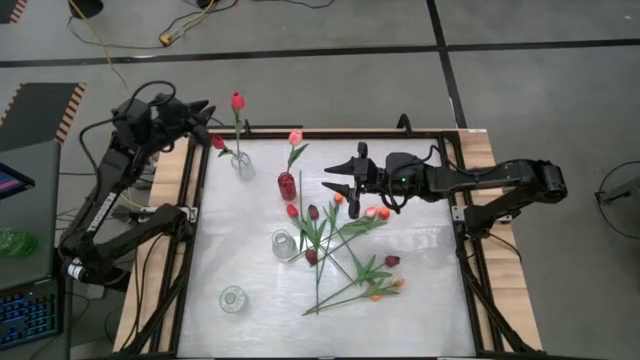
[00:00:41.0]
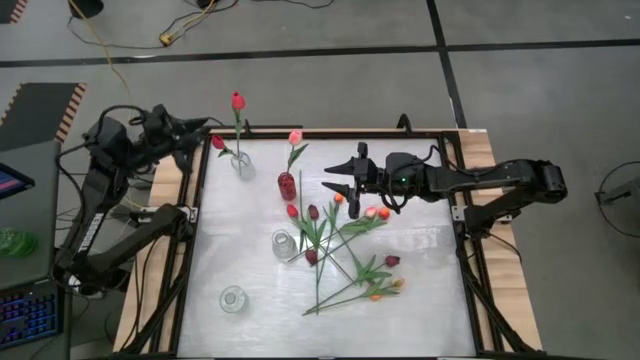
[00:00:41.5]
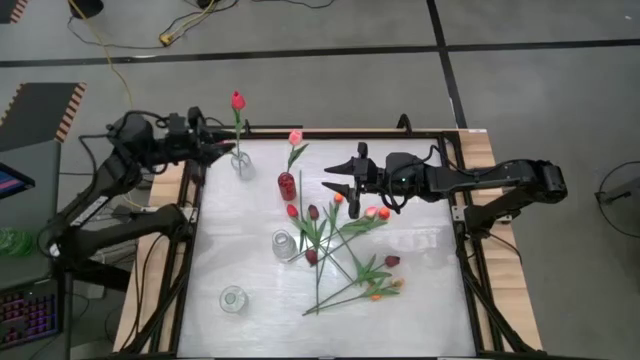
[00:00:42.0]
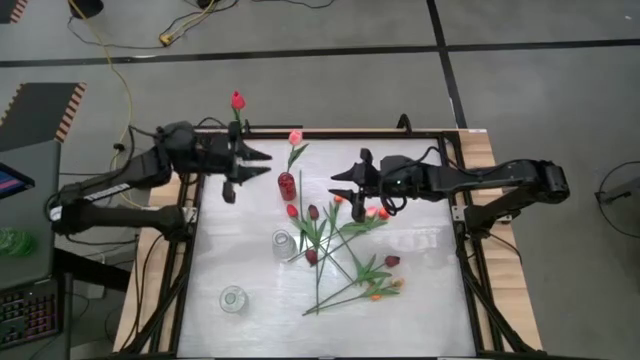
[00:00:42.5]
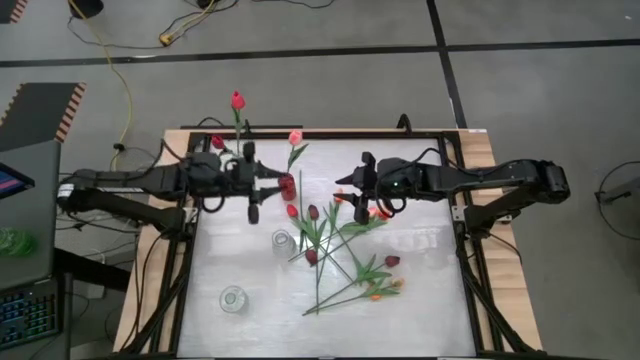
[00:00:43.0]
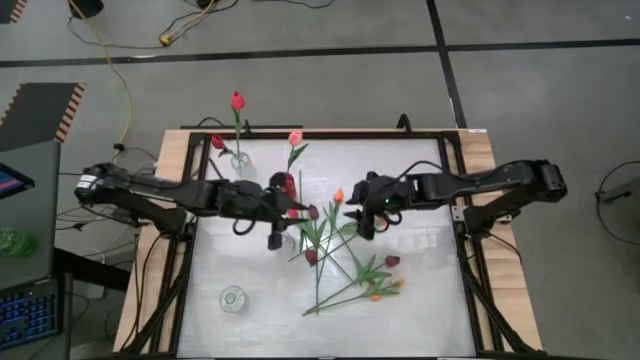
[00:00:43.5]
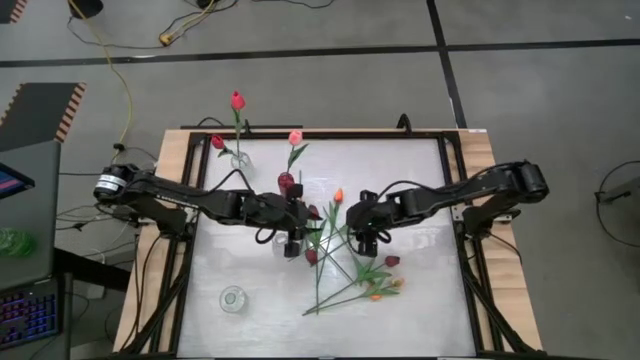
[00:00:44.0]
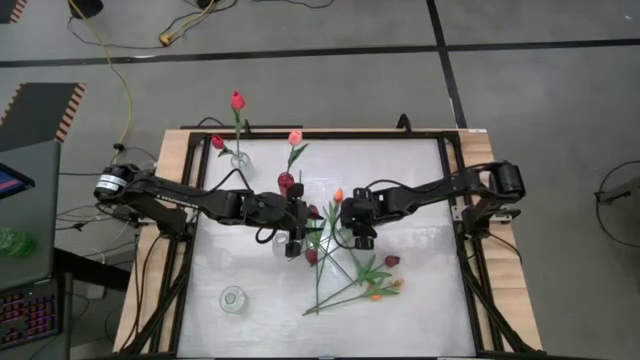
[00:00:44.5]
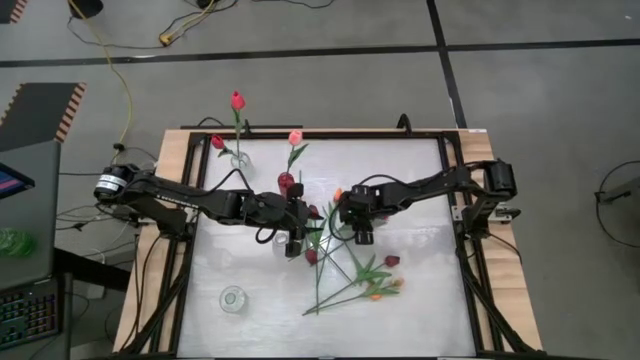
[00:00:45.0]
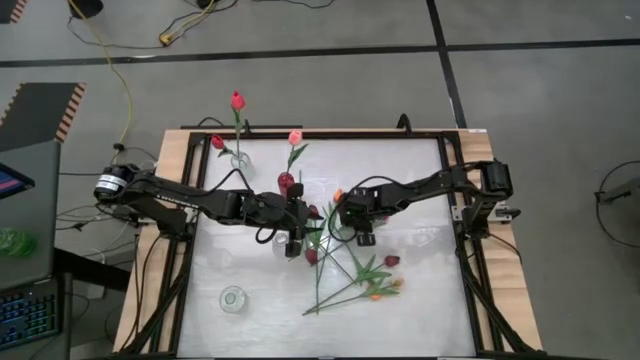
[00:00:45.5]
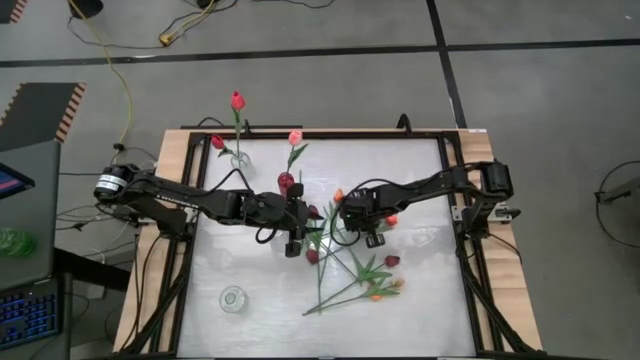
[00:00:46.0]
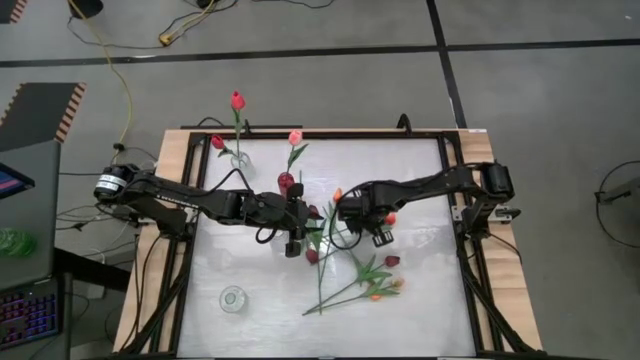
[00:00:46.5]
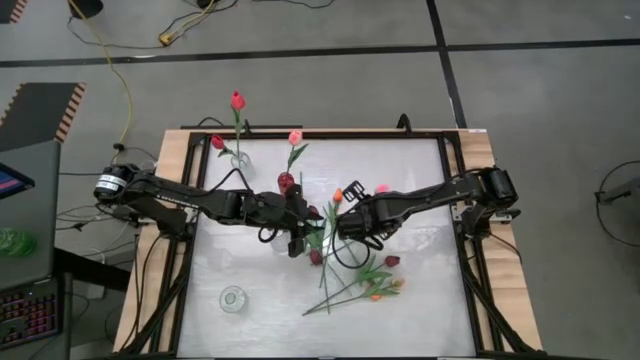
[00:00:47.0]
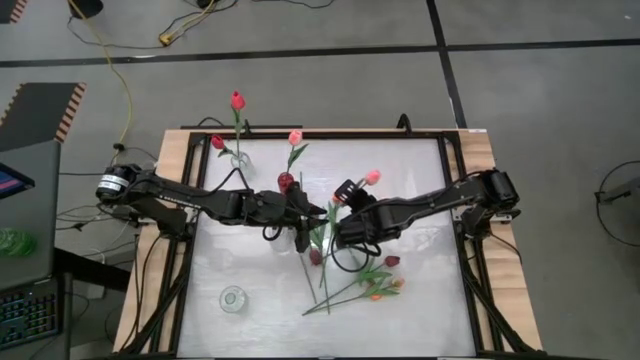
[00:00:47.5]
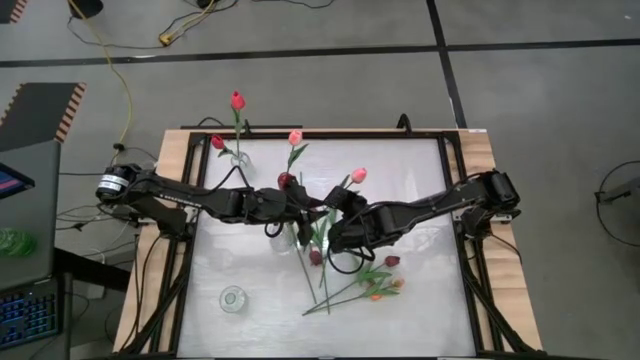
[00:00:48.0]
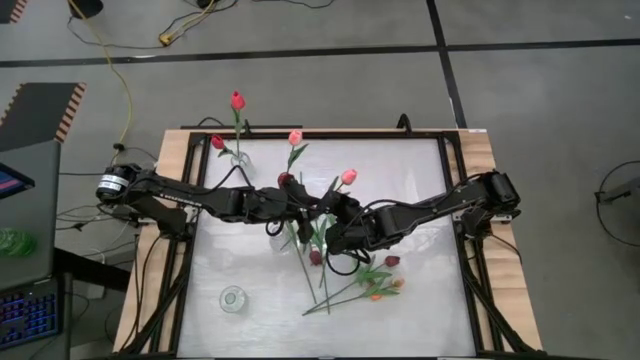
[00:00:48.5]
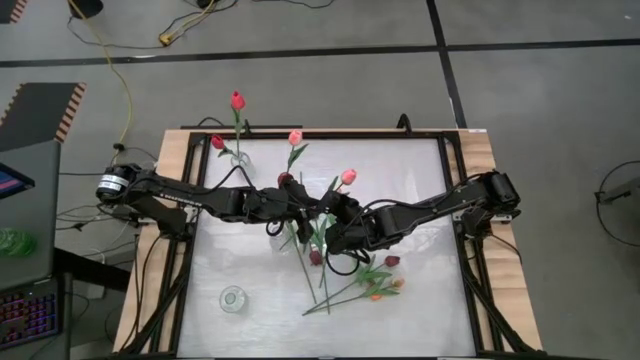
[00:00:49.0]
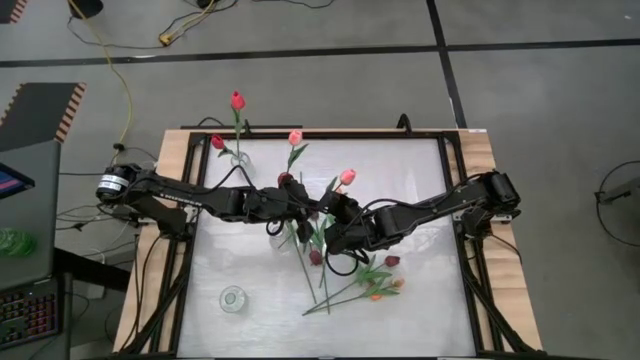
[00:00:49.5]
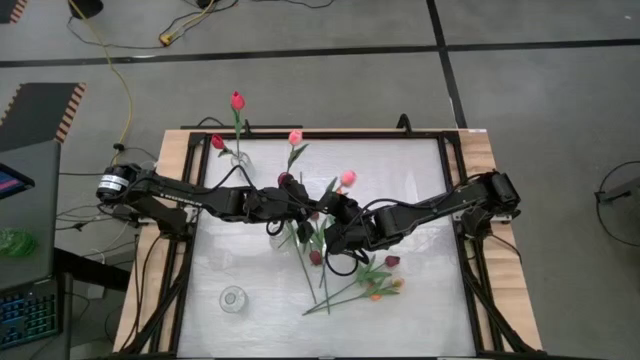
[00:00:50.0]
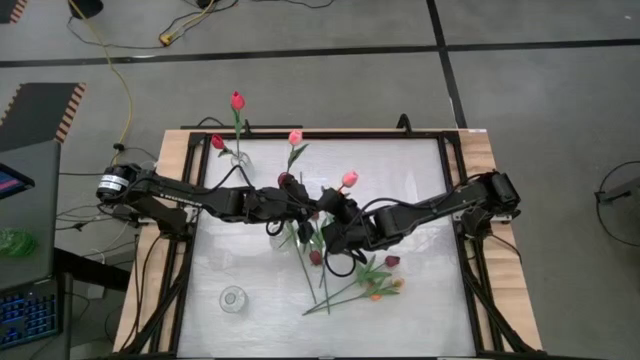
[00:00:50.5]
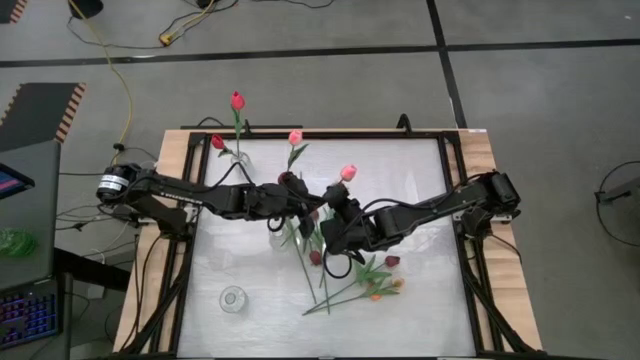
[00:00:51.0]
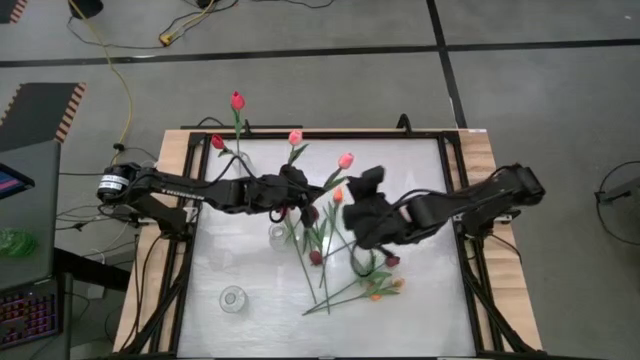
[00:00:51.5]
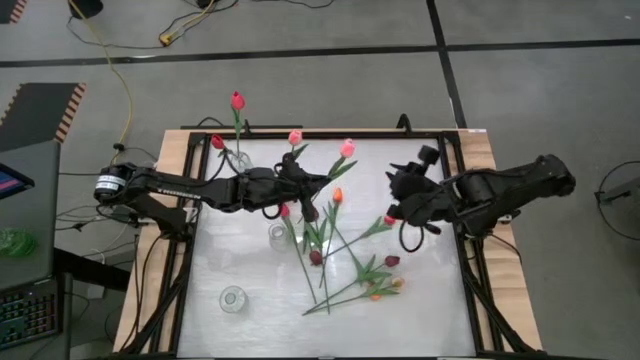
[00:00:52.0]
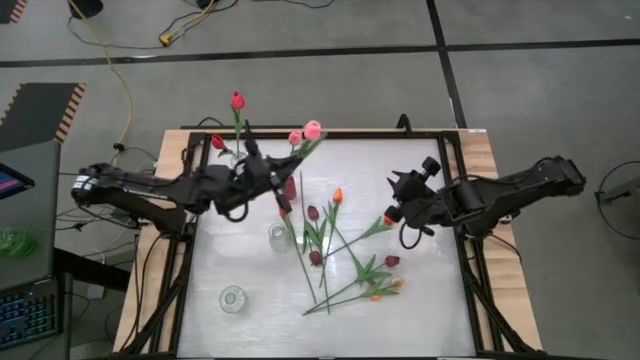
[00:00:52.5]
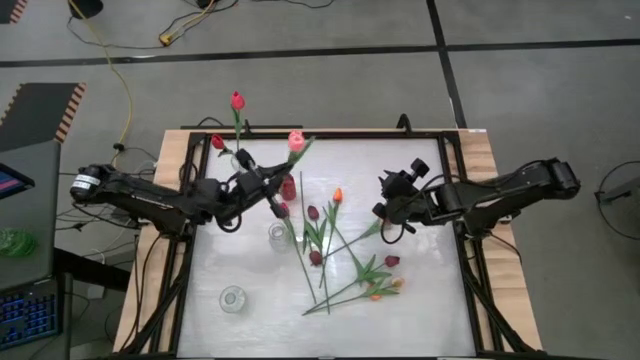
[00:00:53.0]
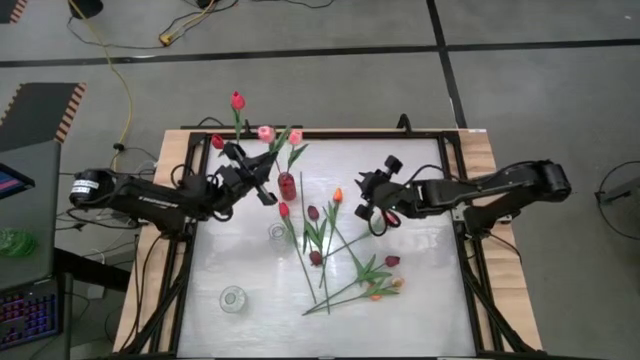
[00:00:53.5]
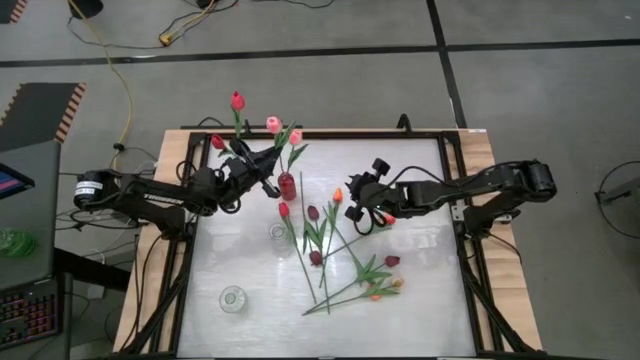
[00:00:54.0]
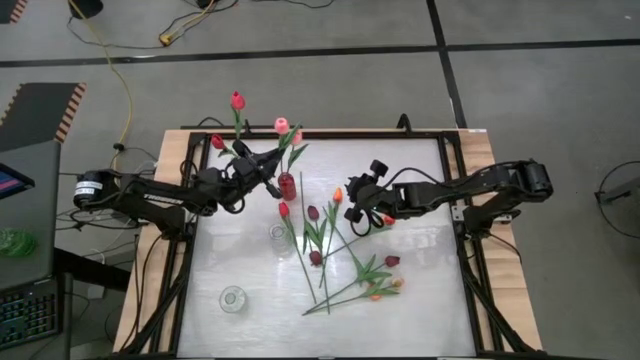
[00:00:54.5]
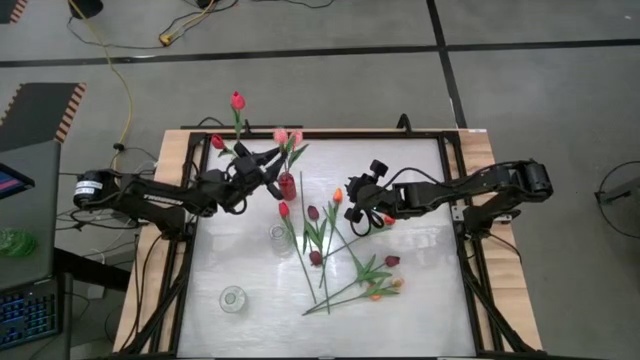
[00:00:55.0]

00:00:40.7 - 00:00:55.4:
Task: Sort flowers into vase by color
Put the pink tulip into the red vase

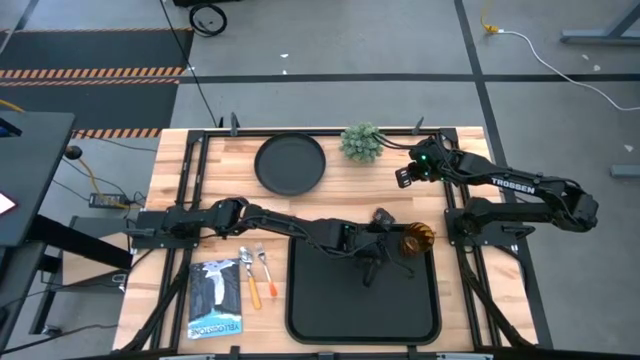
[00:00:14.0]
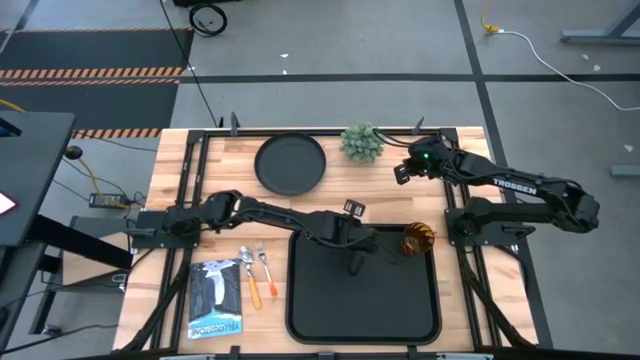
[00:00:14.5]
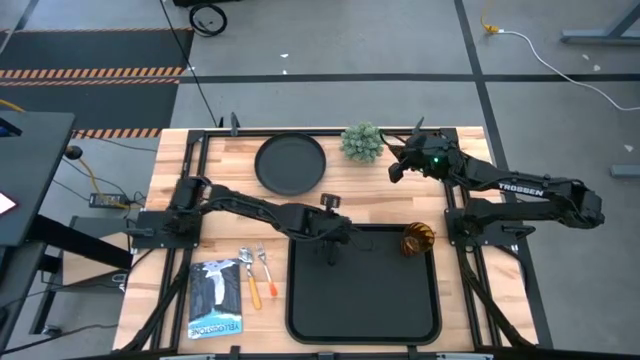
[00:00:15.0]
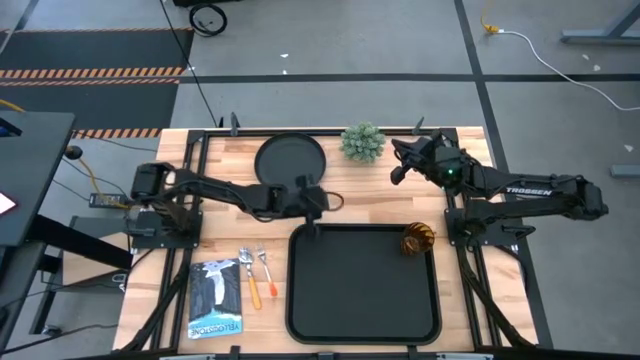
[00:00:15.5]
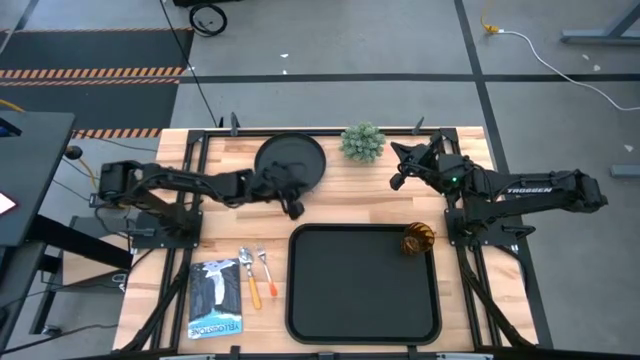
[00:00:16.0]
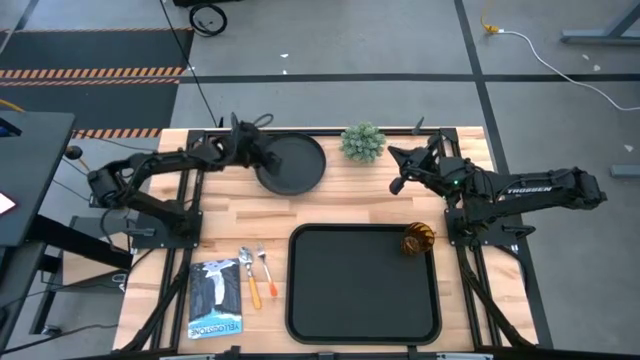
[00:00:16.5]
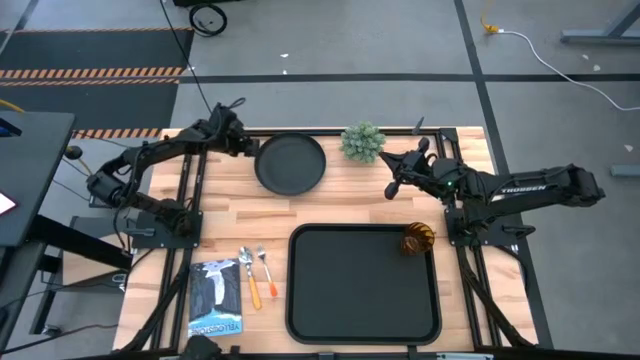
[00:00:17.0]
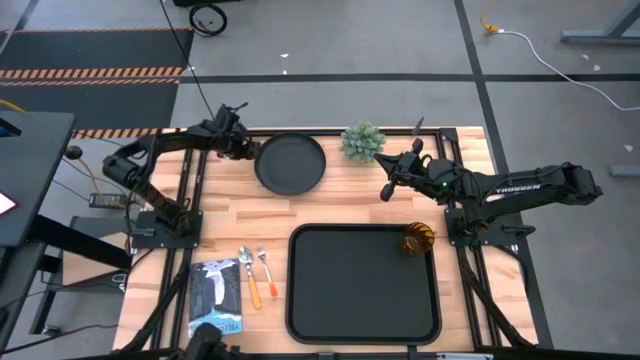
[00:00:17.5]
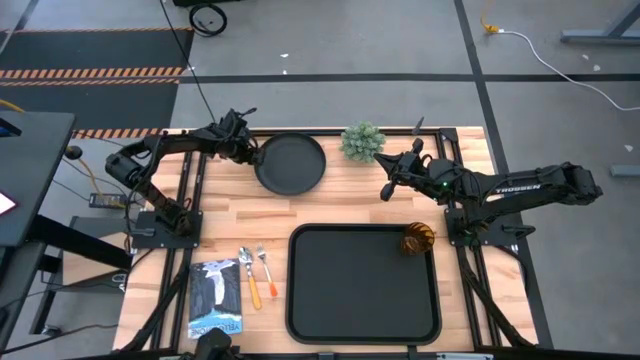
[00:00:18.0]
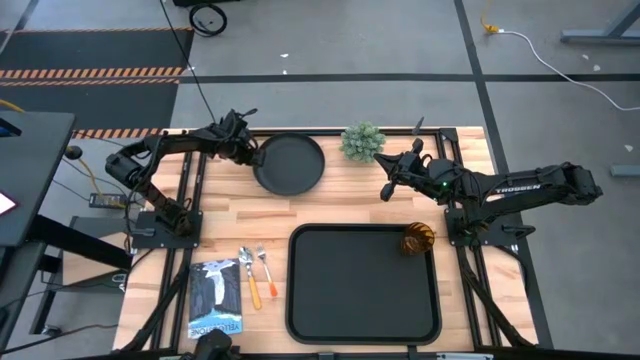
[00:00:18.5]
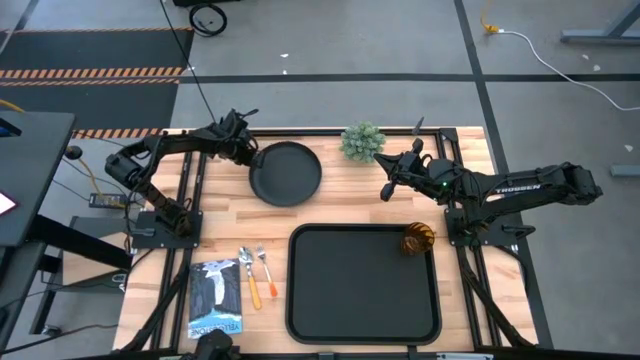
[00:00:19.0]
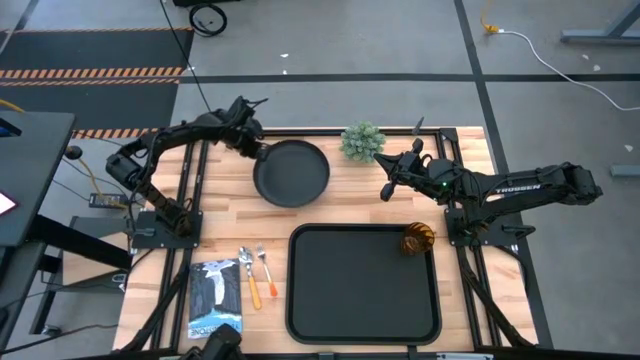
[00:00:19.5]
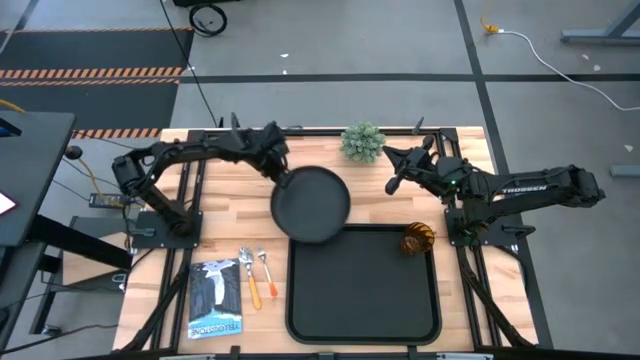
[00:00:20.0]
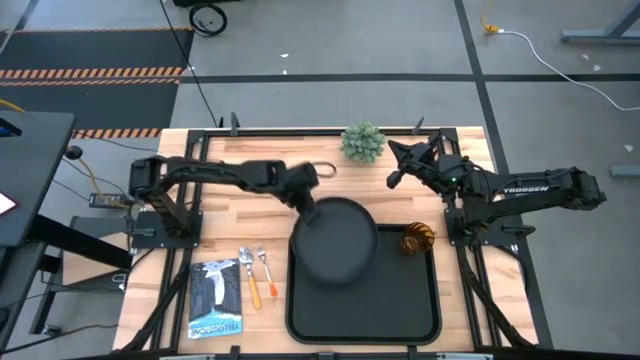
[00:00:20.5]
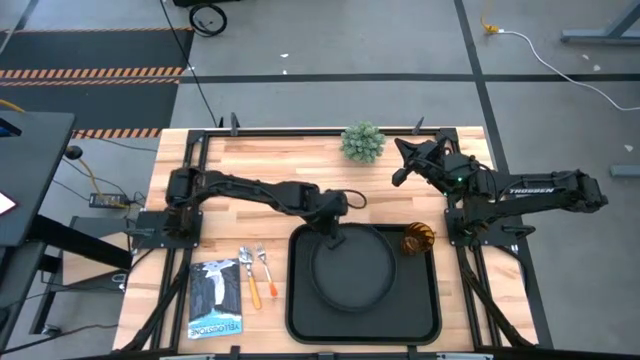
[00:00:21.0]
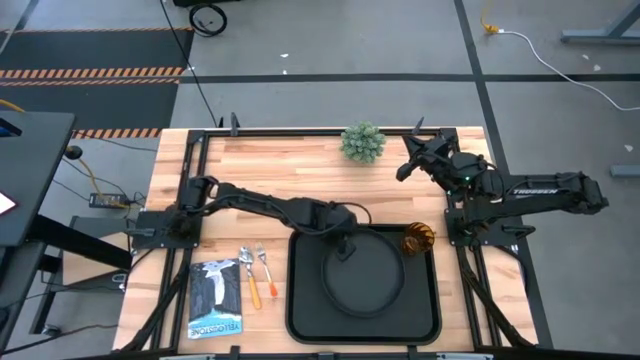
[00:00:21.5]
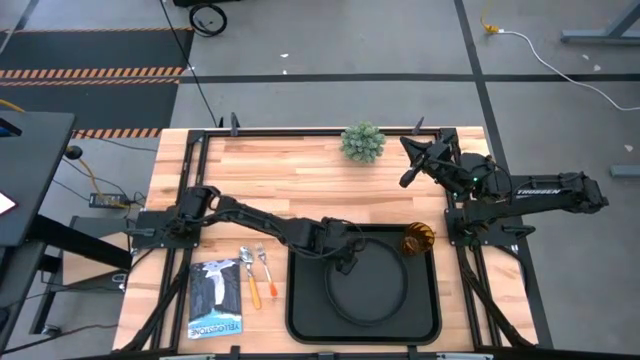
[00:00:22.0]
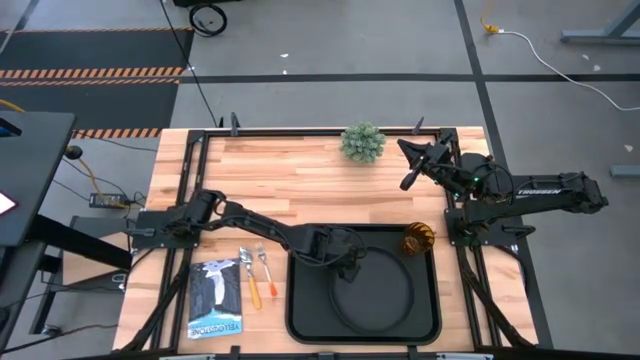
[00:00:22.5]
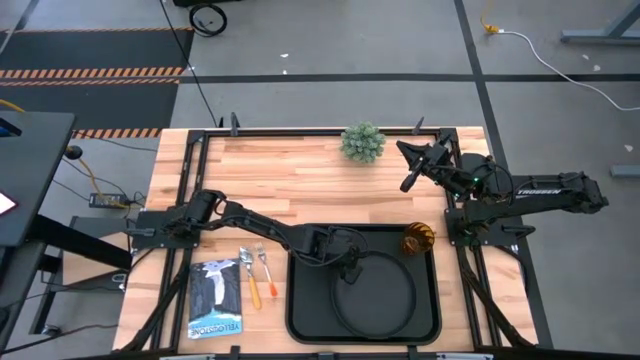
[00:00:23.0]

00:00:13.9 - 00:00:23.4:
Task: Pick and place plate/cup/fork/spoon on tray
Put the black plate on the black tray on the bottom left of the brown cup
